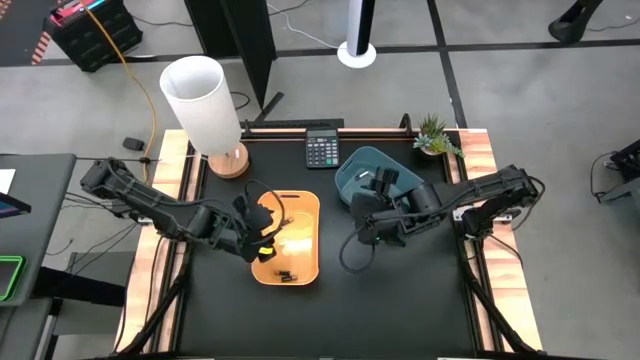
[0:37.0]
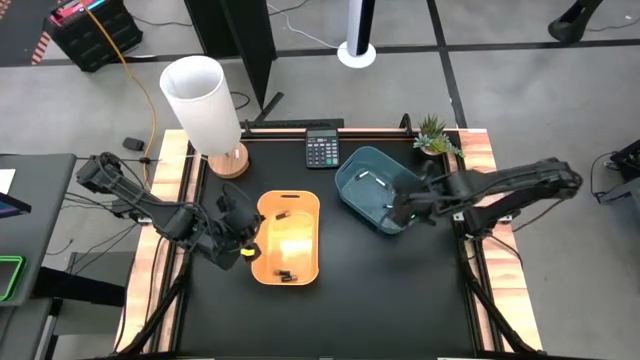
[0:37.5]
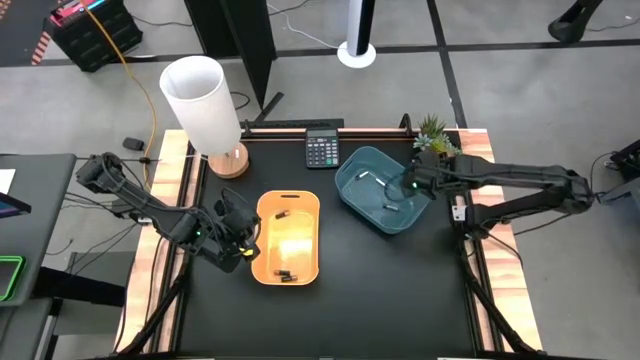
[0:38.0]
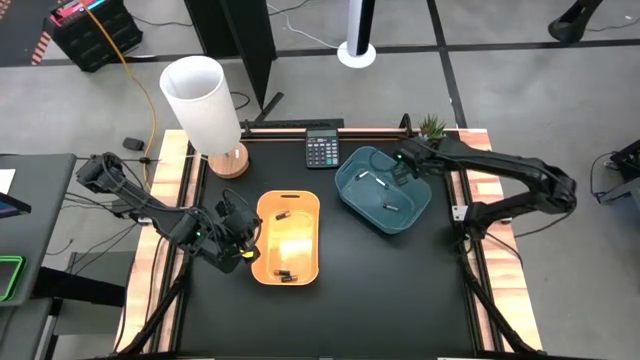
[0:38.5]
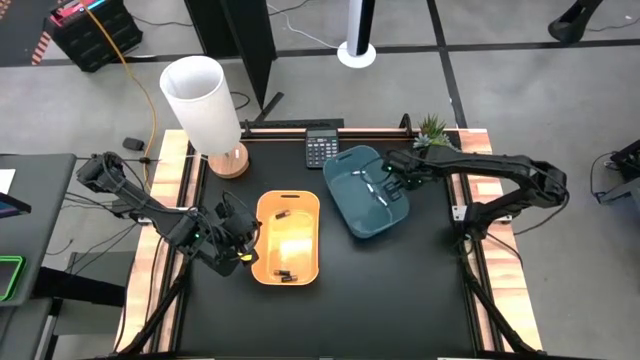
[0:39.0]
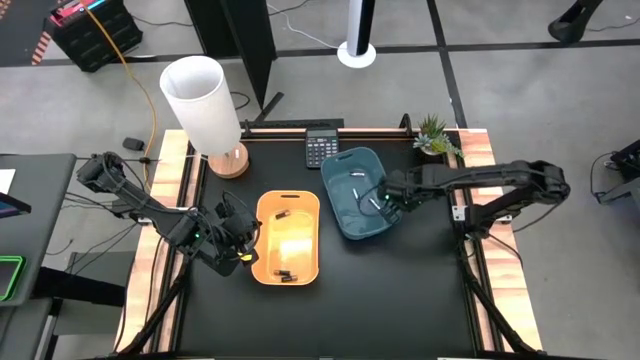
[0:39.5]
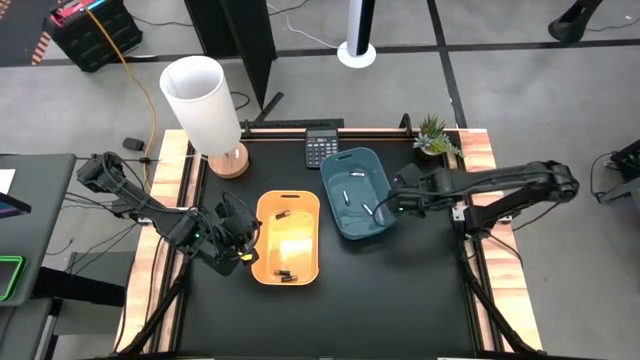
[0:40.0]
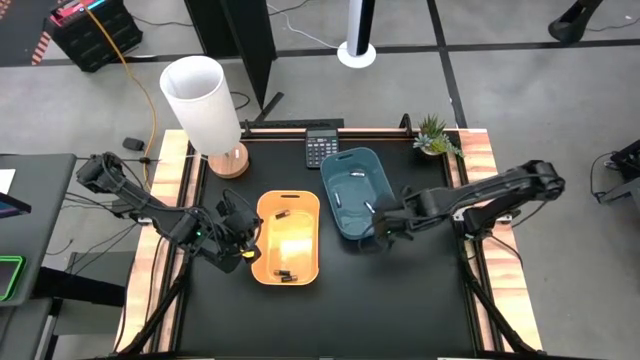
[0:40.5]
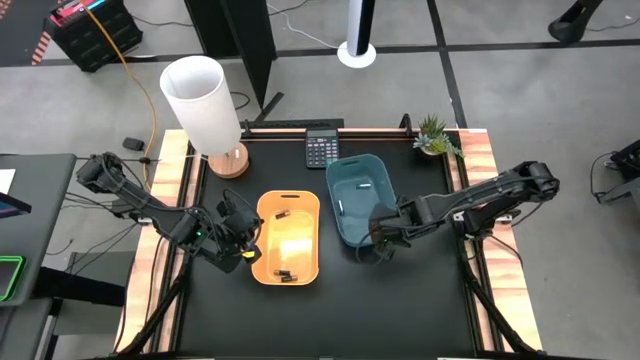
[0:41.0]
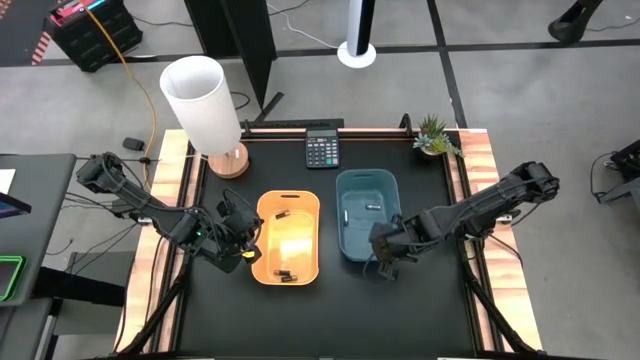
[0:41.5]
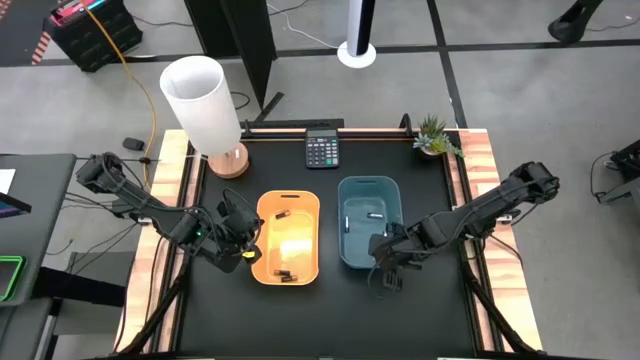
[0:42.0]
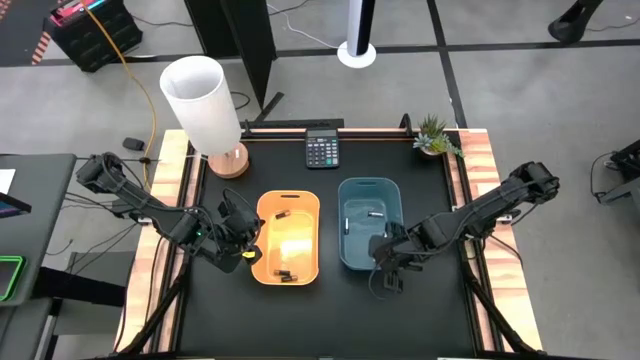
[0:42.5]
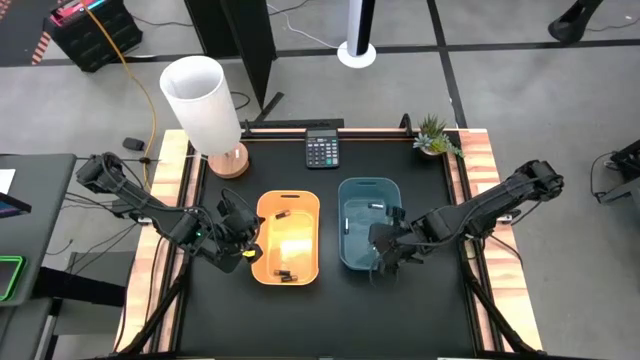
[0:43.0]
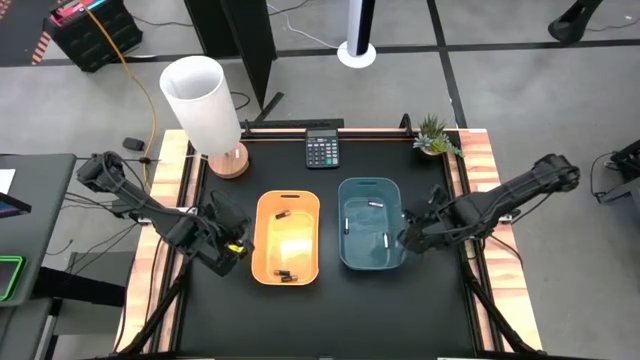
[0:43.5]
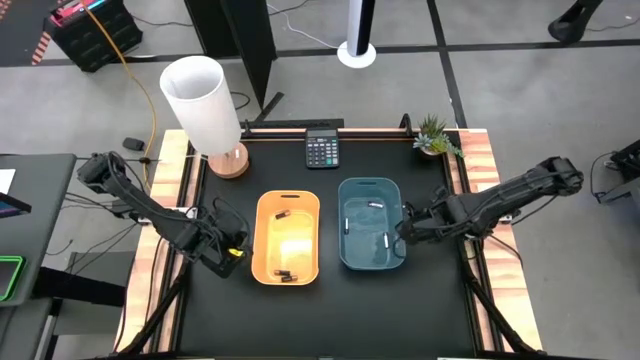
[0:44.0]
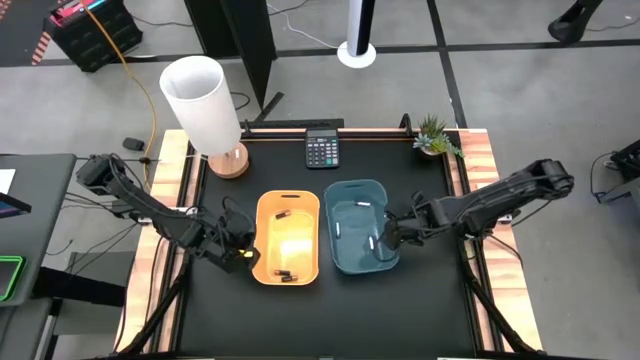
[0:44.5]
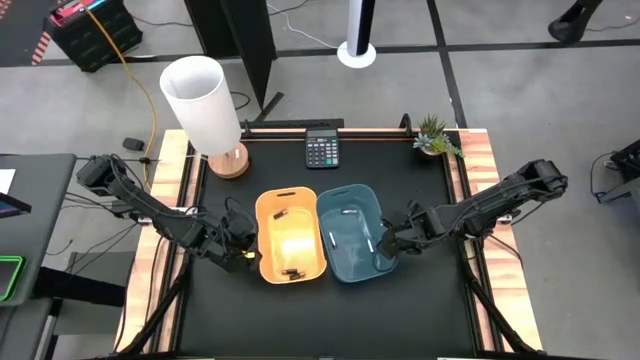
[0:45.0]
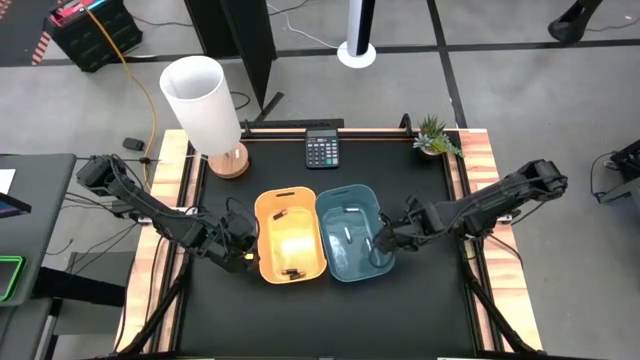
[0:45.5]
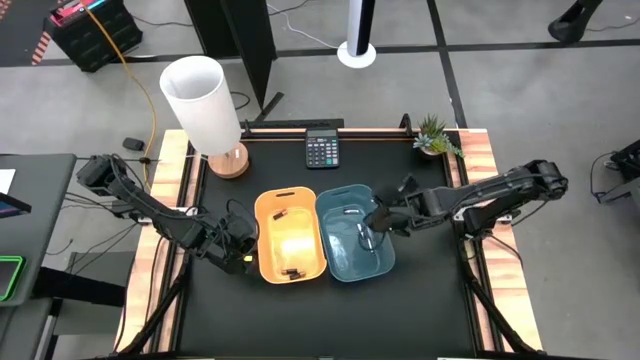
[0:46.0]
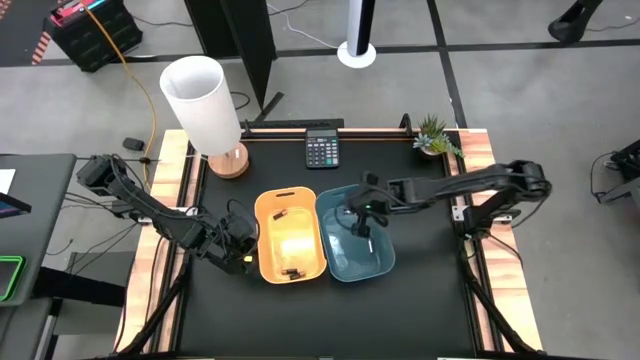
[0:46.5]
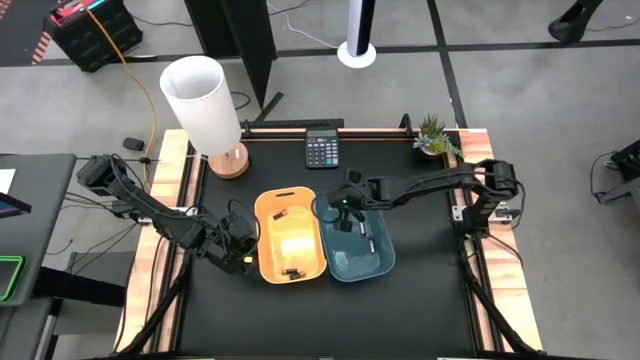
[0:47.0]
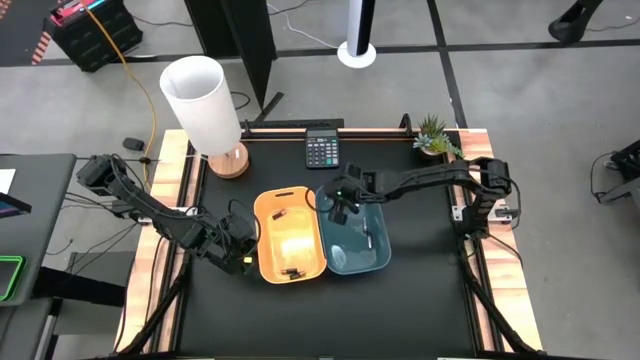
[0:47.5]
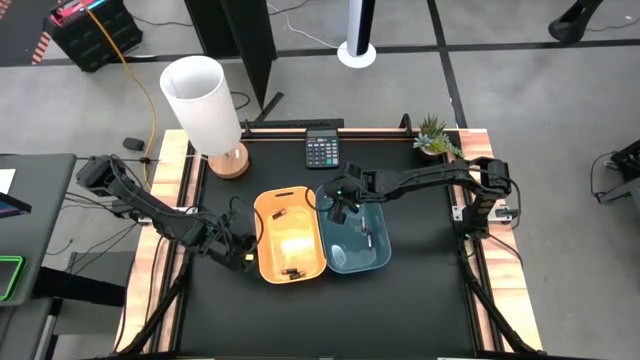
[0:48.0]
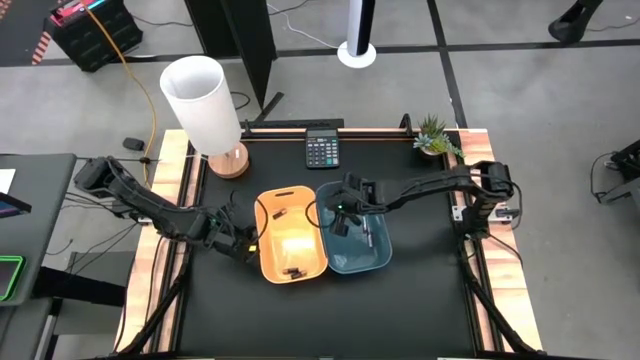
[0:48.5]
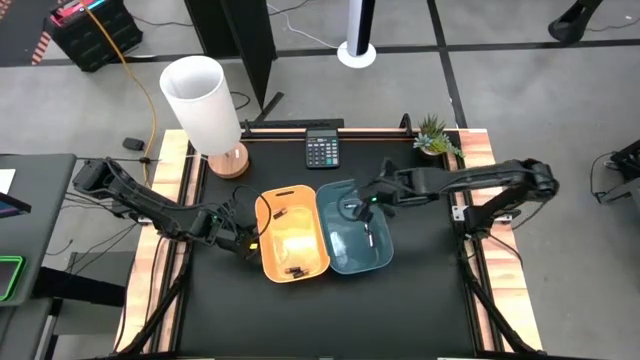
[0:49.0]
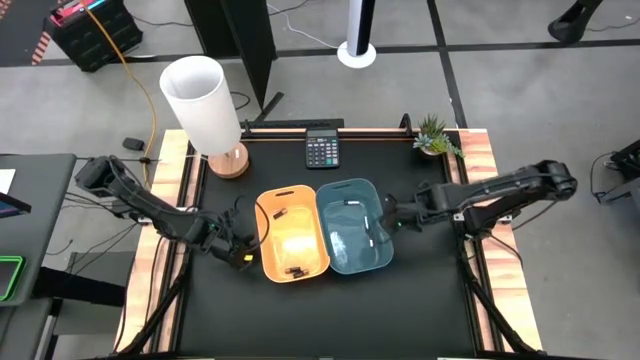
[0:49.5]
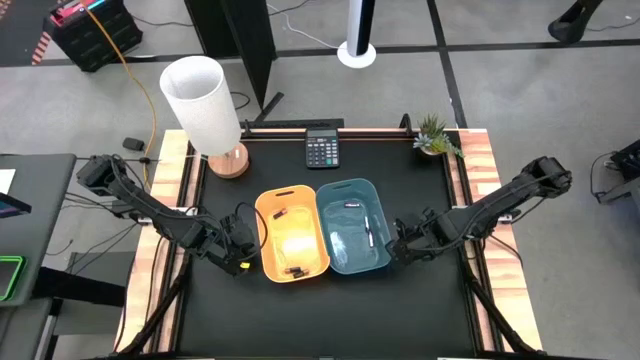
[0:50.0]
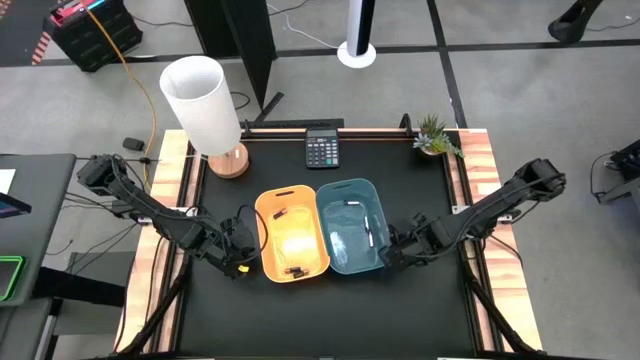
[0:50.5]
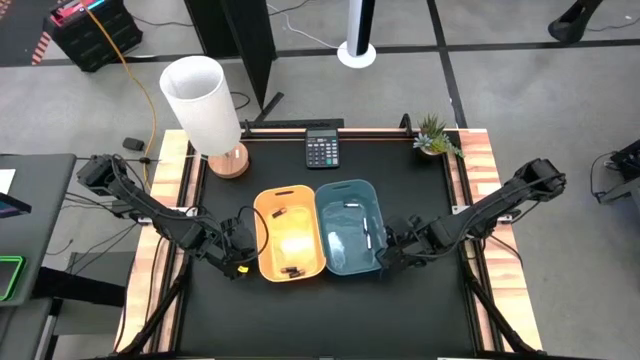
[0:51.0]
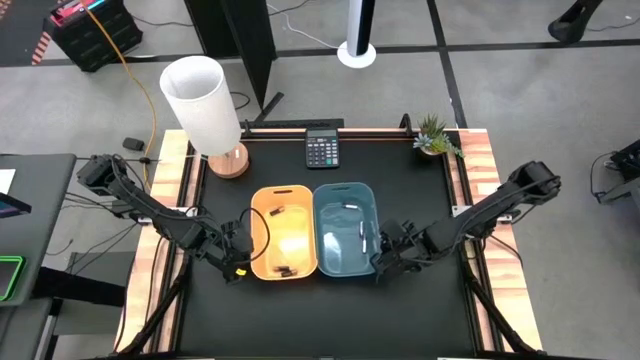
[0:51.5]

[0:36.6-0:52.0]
Task: Sort batteries
Adjust the yellow and blue bins

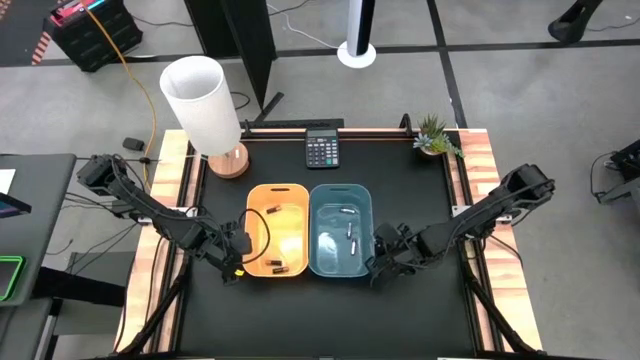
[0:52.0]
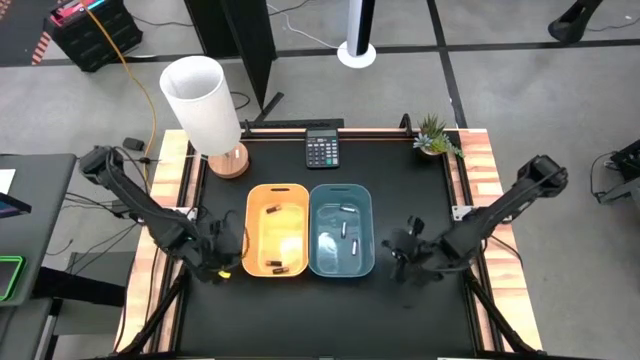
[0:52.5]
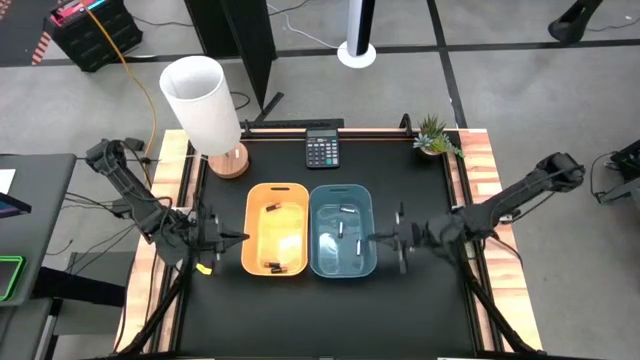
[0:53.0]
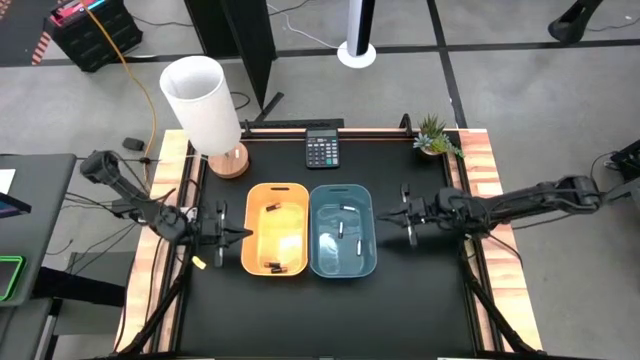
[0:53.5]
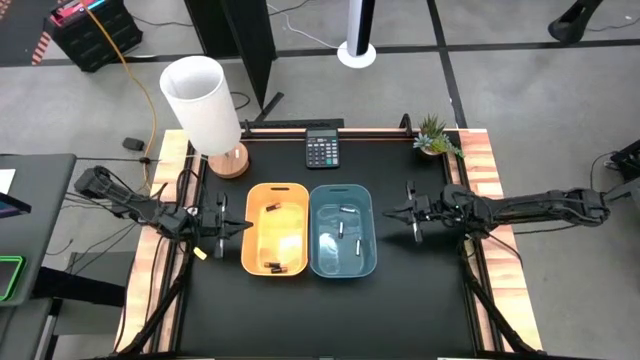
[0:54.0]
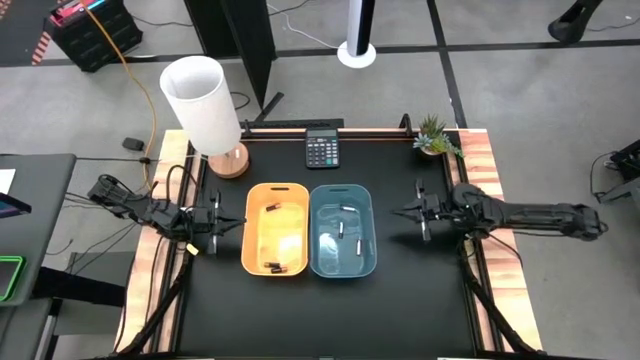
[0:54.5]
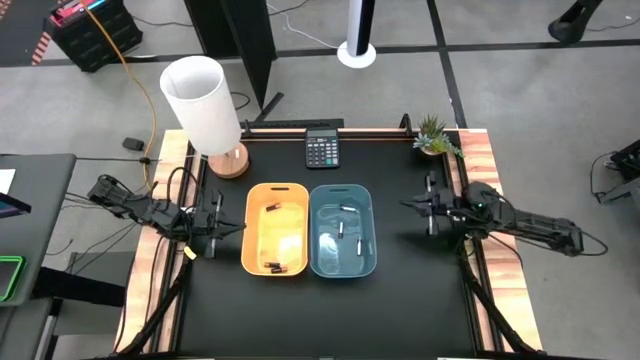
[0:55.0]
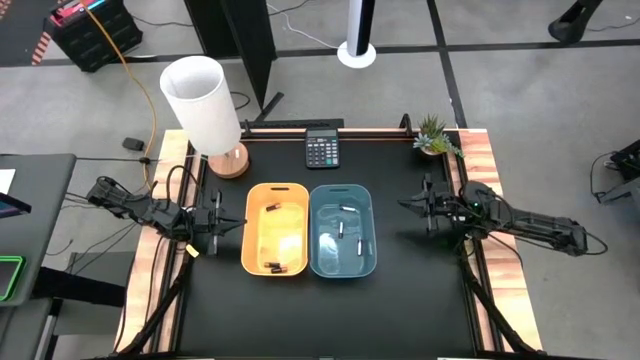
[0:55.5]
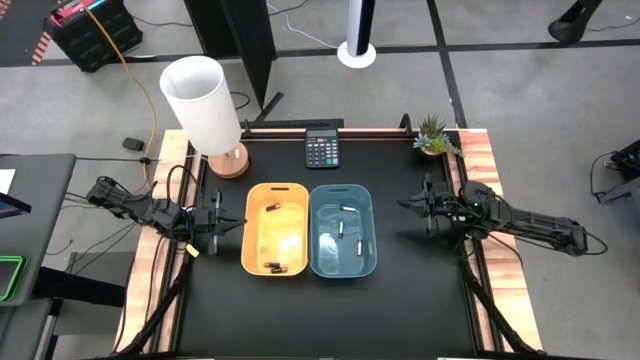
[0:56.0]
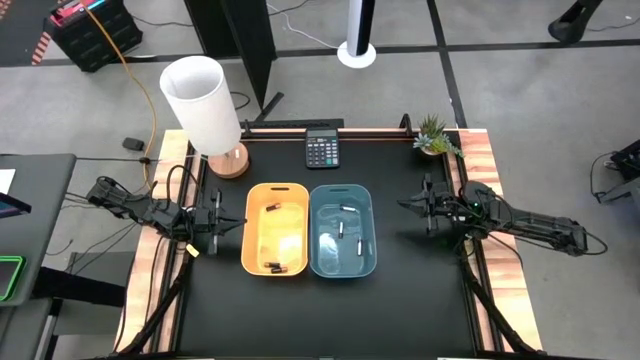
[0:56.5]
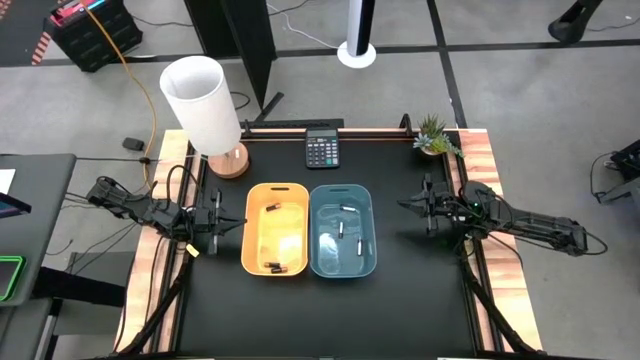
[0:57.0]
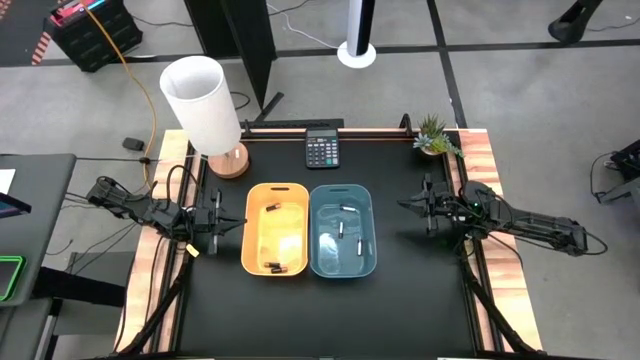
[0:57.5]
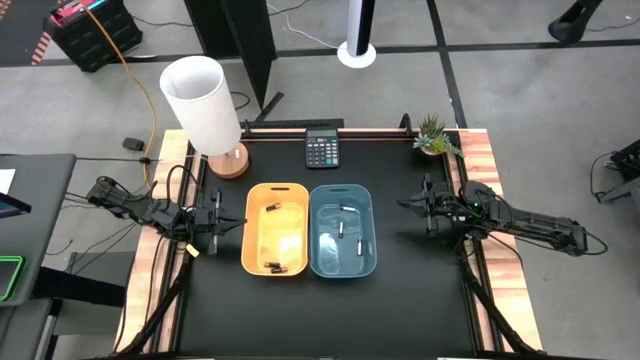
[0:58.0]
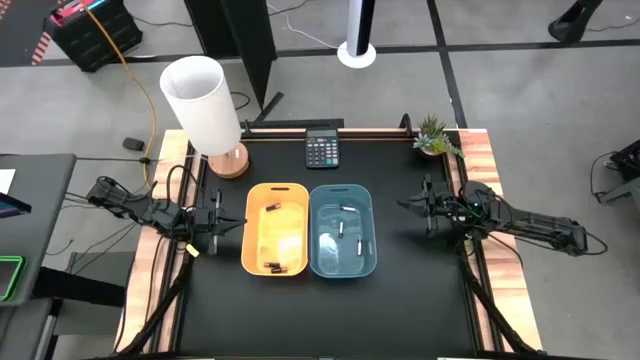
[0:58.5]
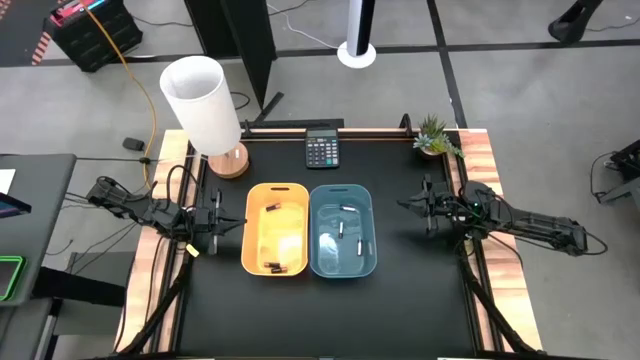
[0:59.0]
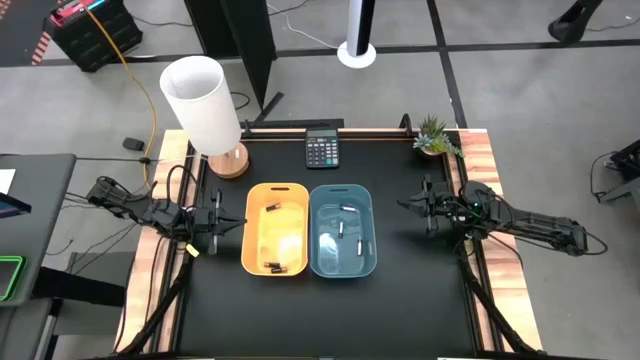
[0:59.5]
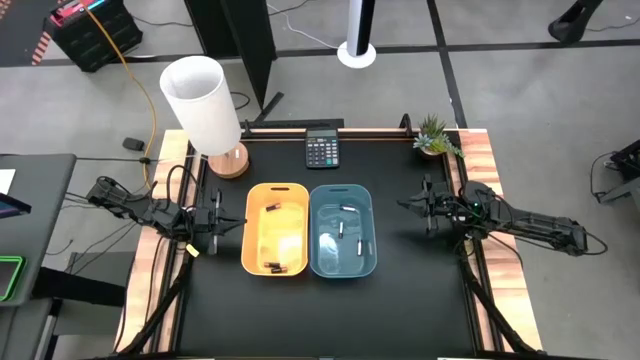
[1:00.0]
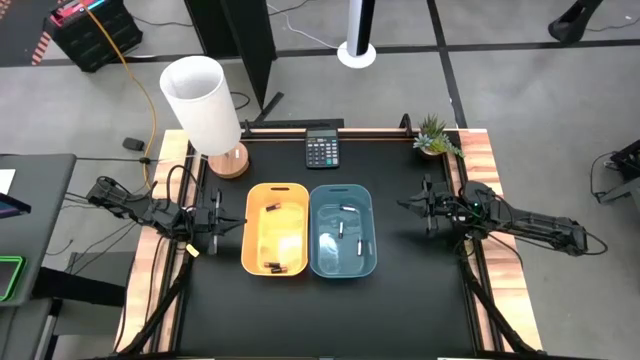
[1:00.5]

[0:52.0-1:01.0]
Return to Home Position
